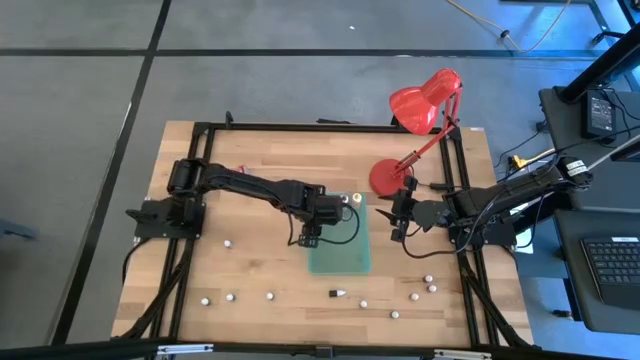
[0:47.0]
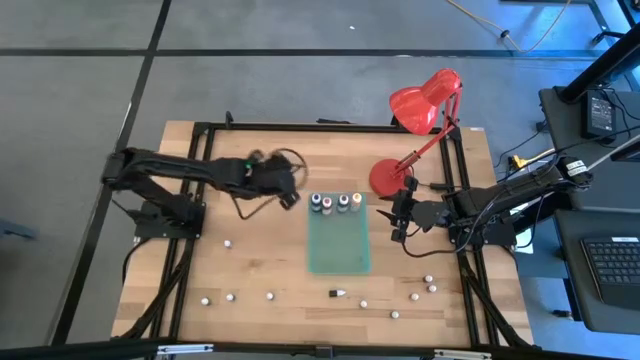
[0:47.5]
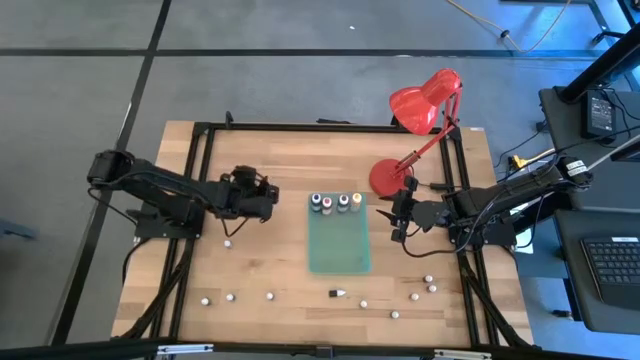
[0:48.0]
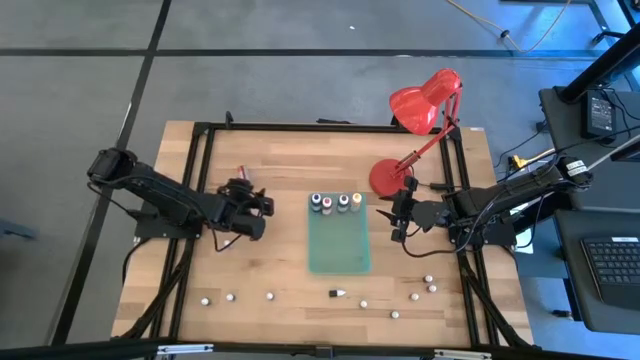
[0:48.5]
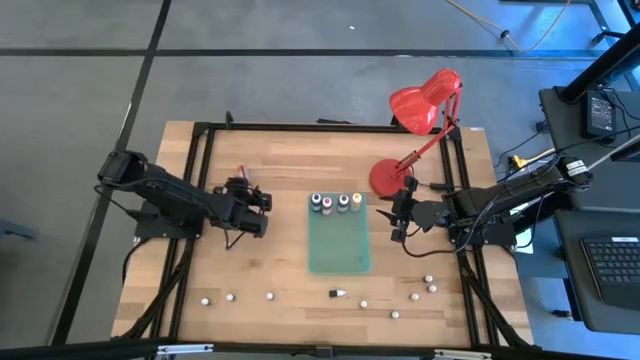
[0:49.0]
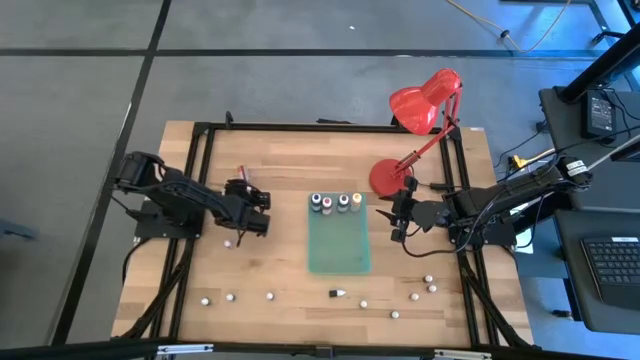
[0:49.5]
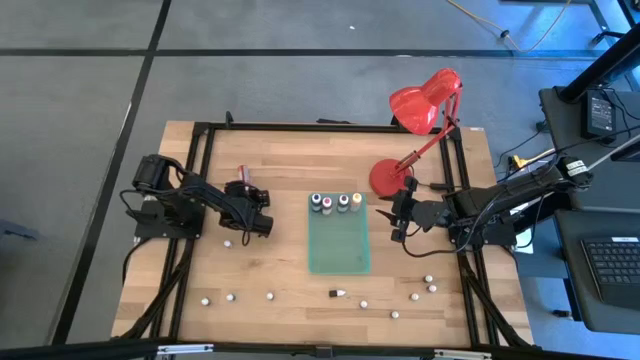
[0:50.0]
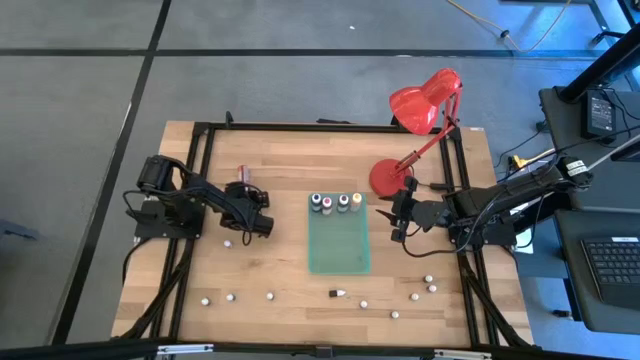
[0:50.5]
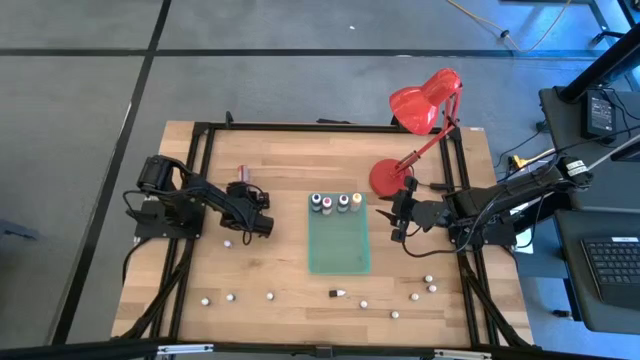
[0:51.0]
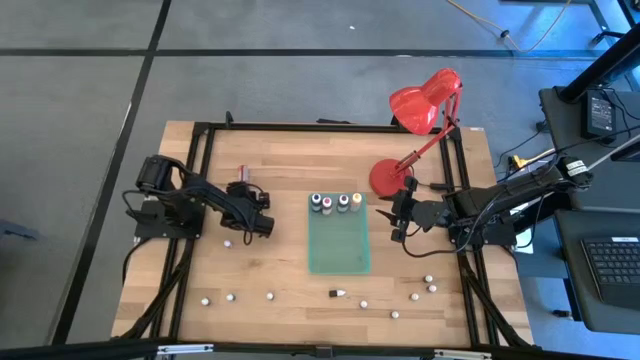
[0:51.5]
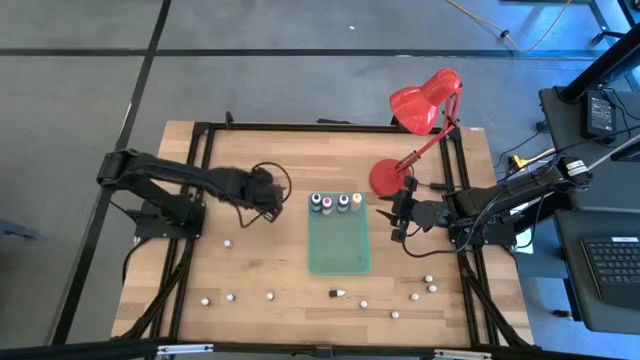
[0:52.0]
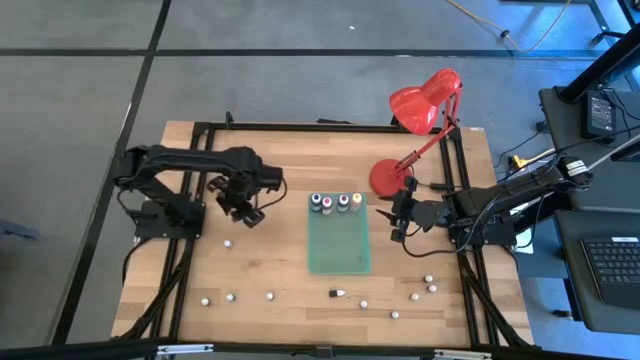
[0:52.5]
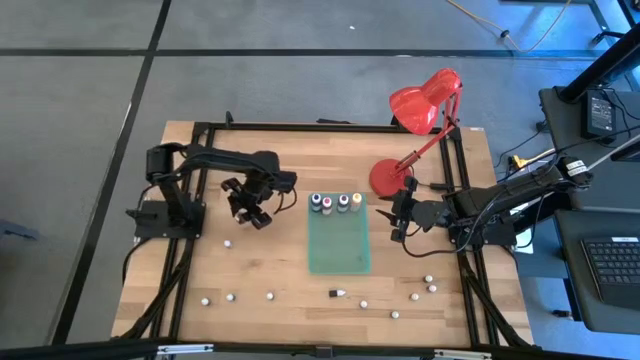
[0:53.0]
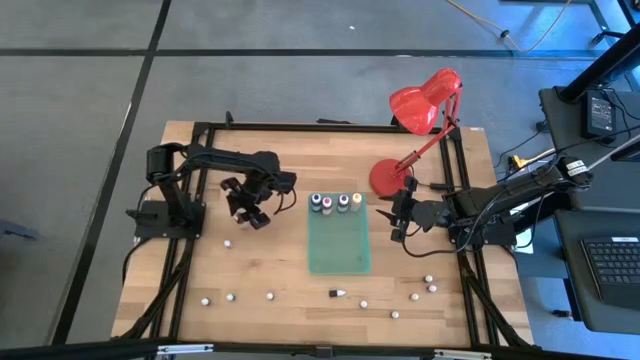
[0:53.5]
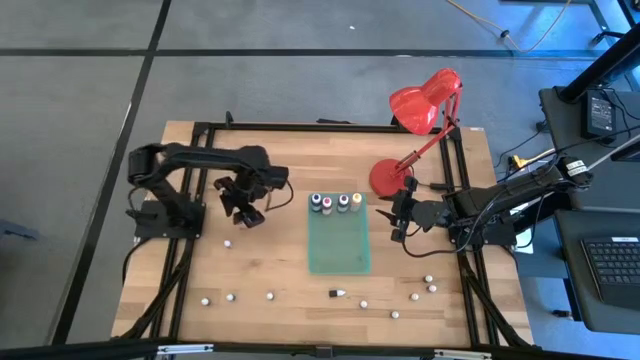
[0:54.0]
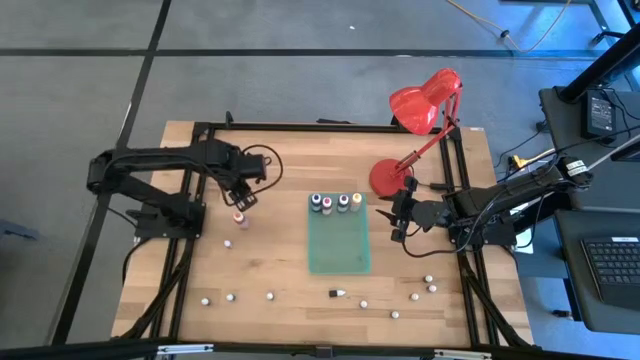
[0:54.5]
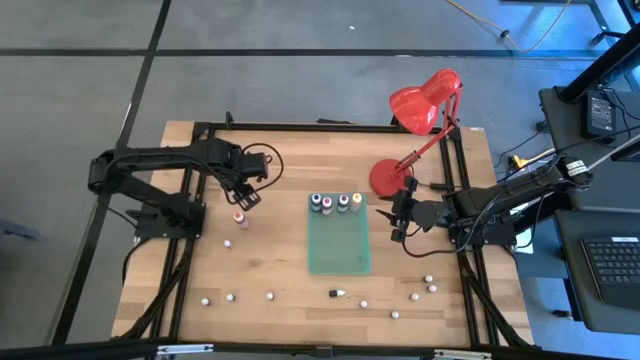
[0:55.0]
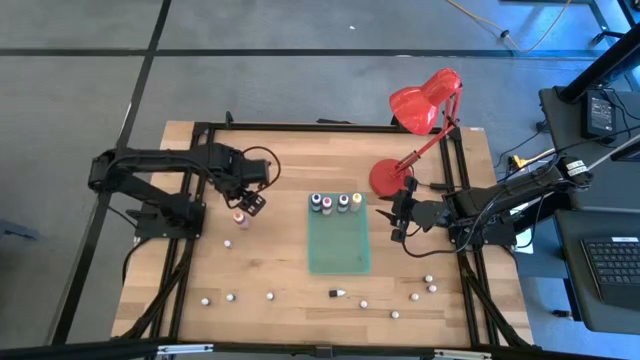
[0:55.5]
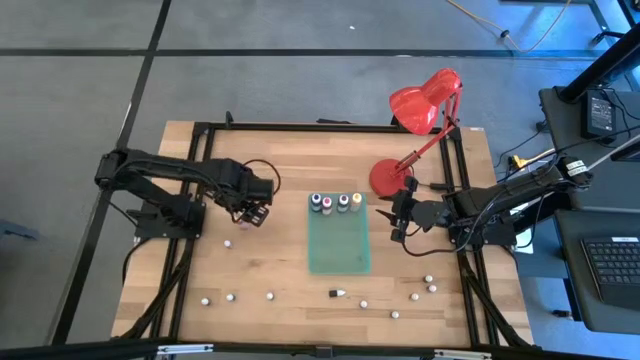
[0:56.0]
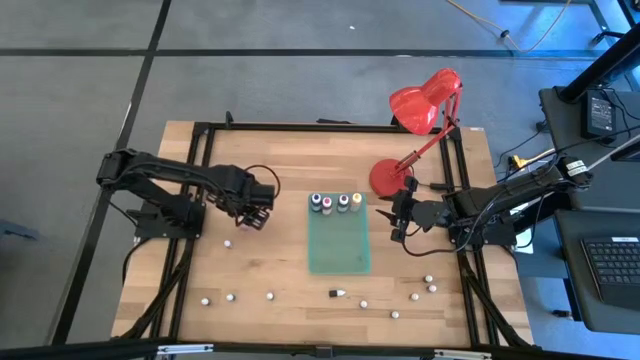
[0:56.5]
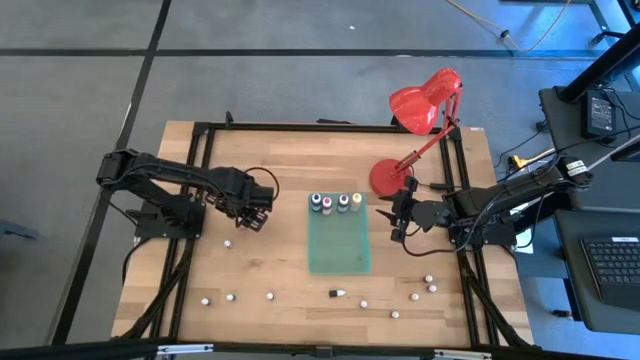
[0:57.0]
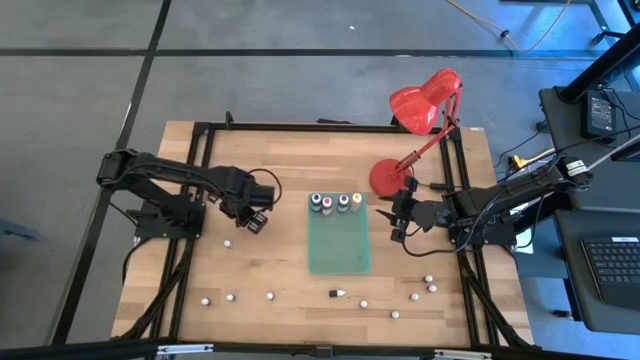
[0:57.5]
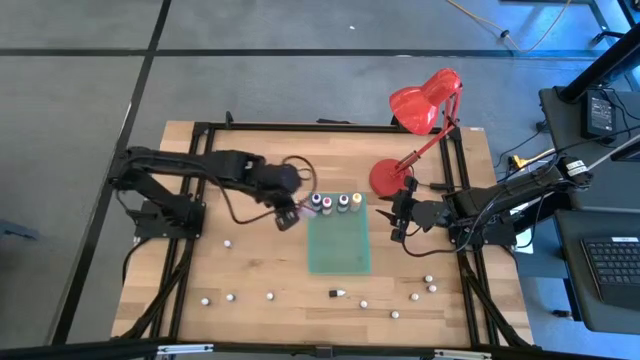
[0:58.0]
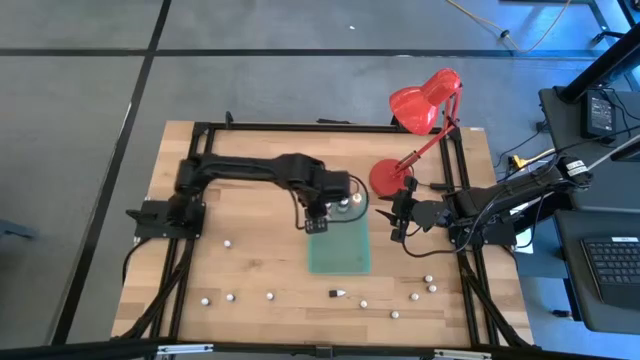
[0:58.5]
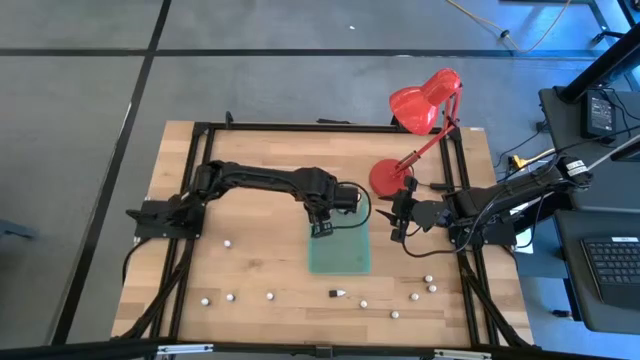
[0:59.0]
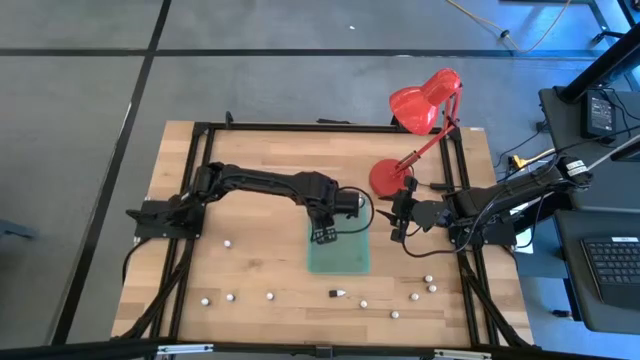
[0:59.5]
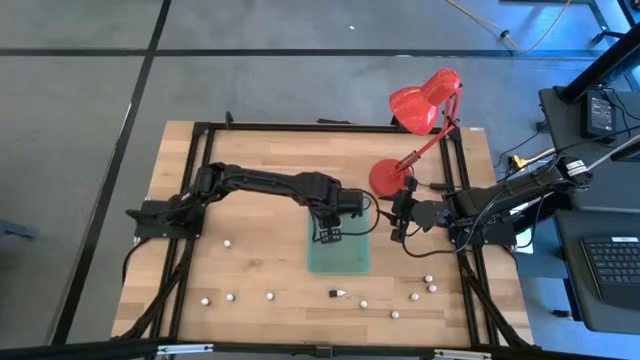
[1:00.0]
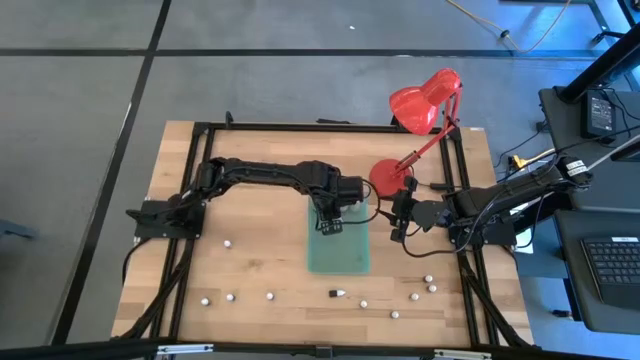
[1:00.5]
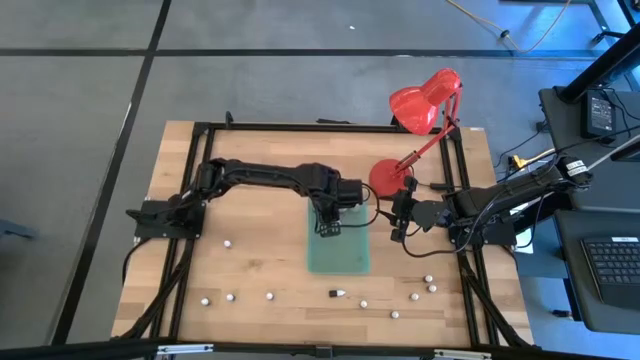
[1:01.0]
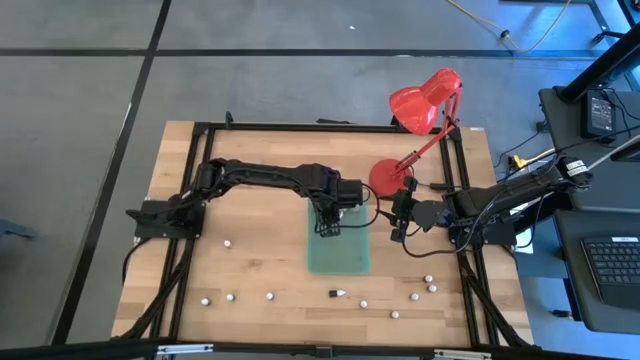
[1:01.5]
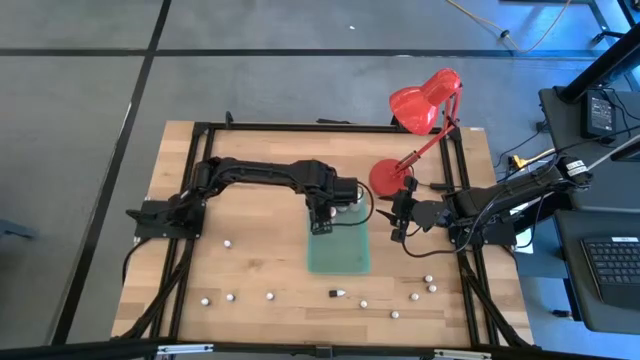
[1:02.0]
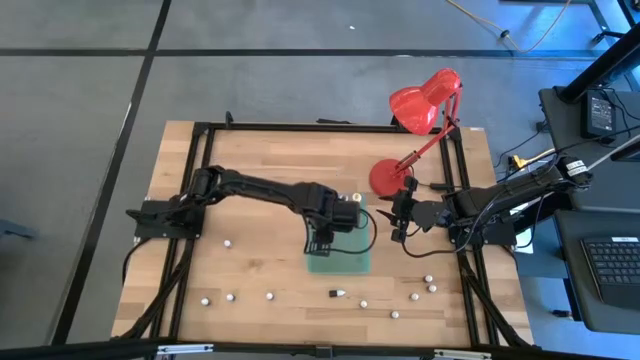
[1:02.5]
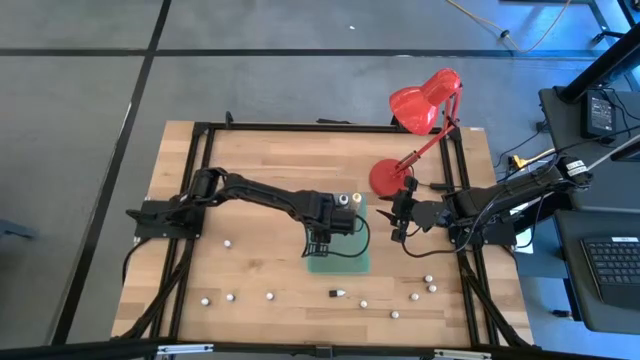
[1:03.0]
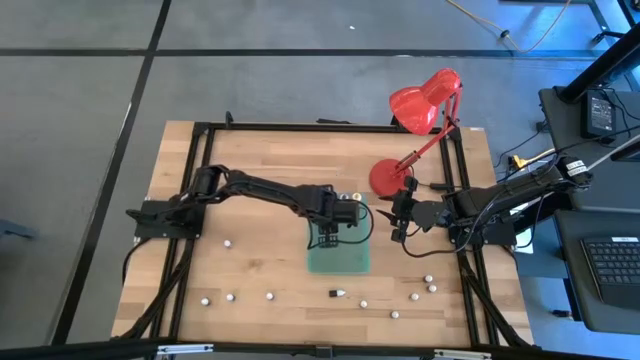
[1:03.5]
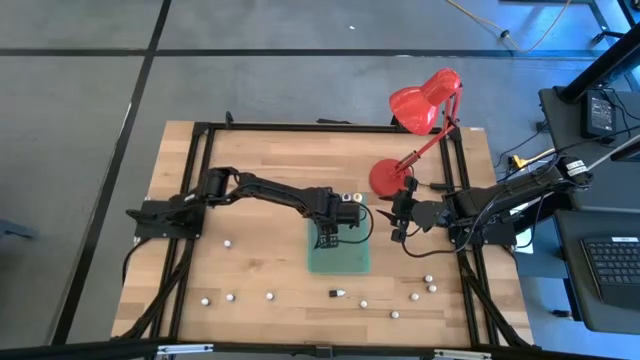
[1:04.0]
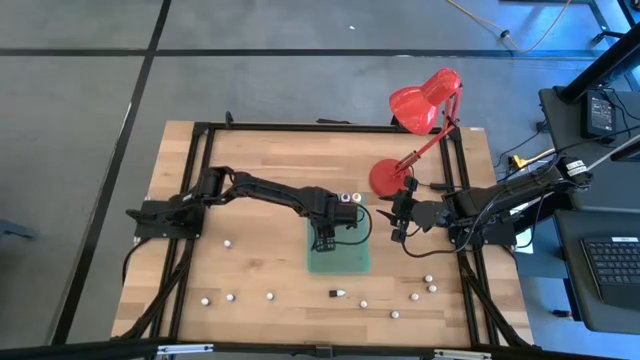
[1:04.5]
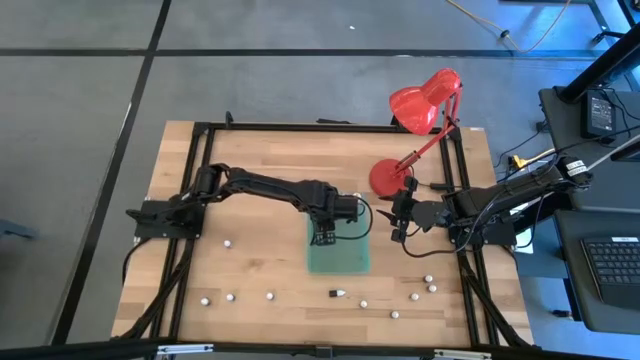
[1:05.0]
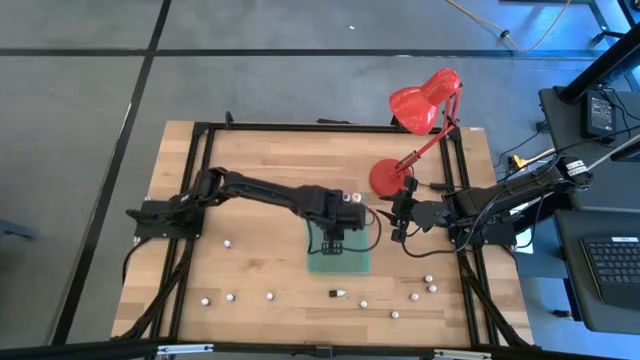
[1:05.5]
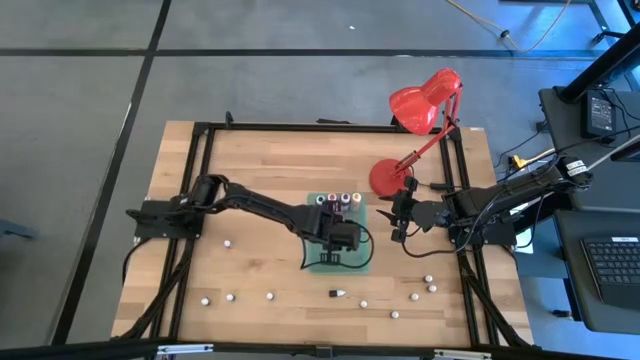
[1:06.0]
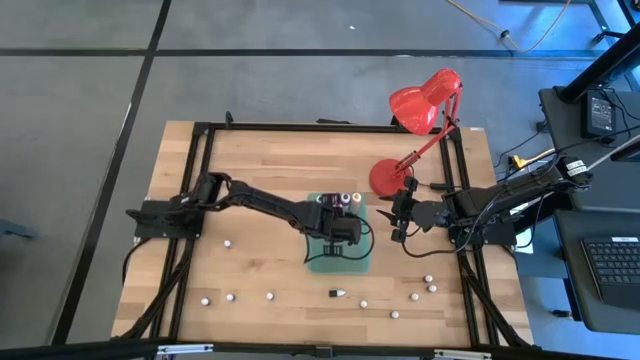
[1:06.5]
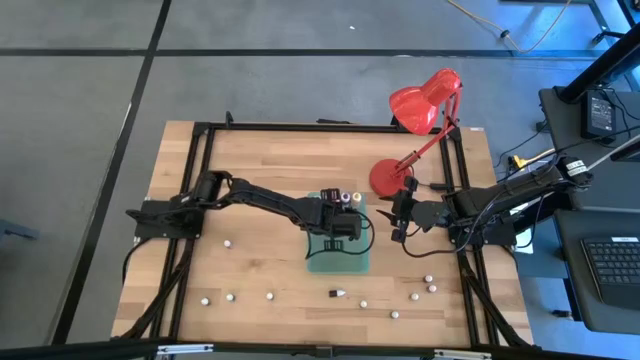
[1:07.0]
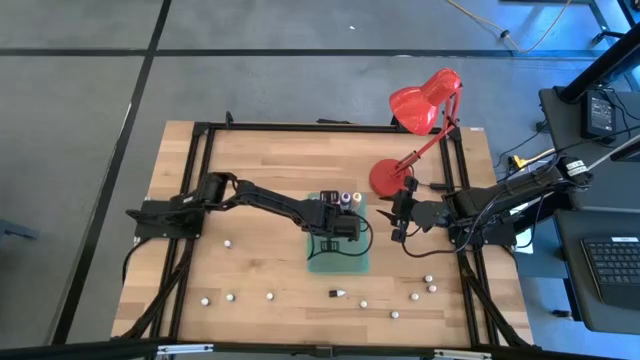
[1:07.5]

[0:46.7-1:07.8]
Task: Pick & Place food coloring
Put the large orange food coloring bottle into the green bin

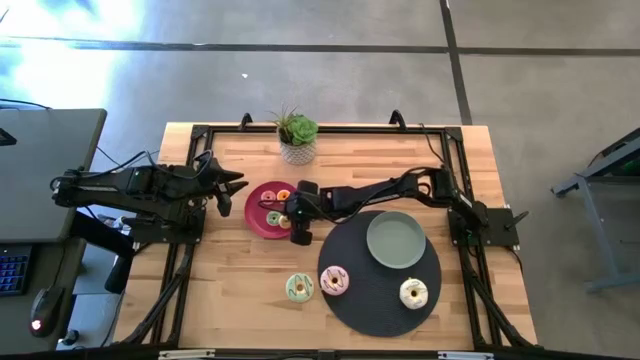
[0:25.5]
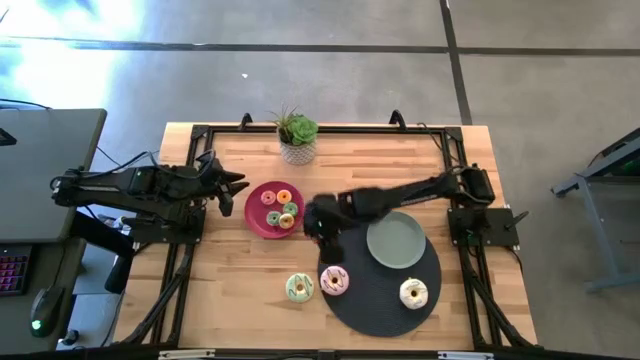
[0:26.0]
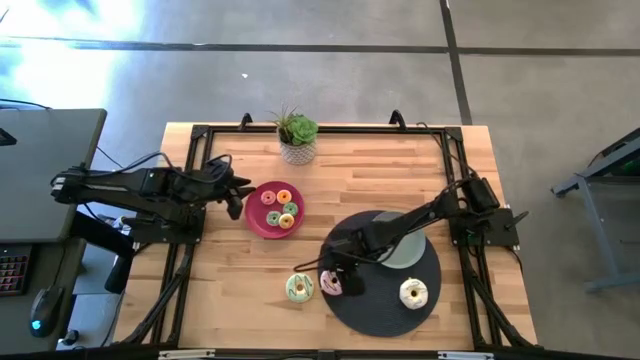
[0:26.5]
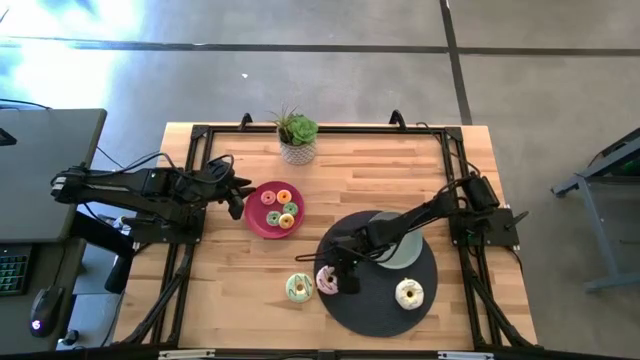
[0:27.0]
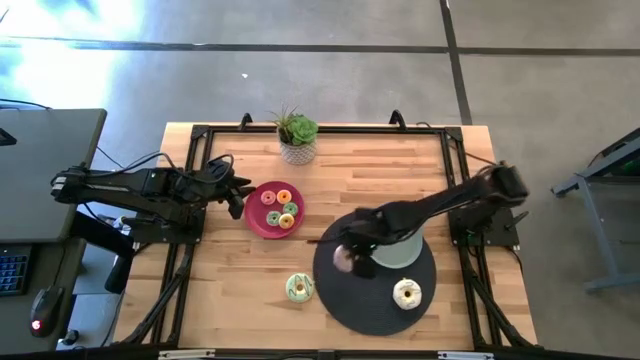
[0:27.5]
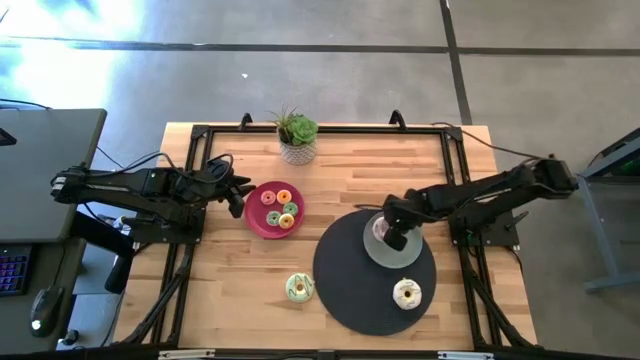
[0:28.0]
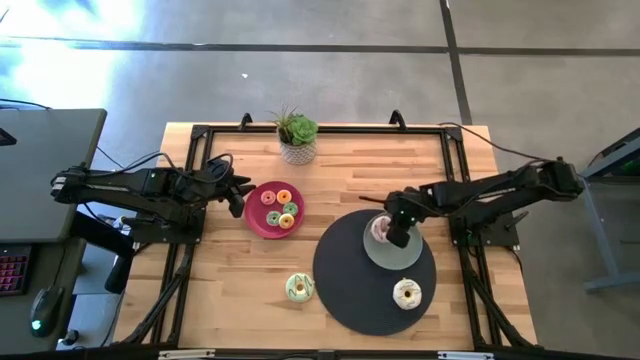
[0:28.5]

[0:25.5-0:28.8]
Task: Pick & Place donuts
Put the large purple donut on the blue plate
